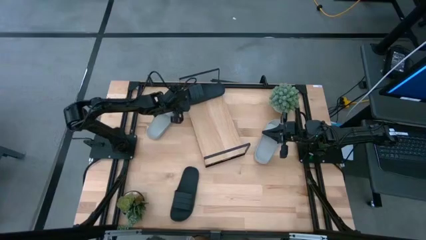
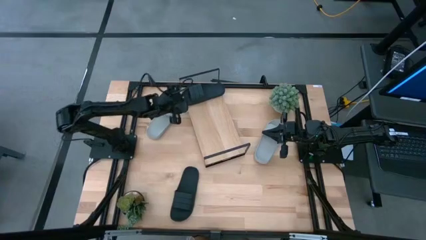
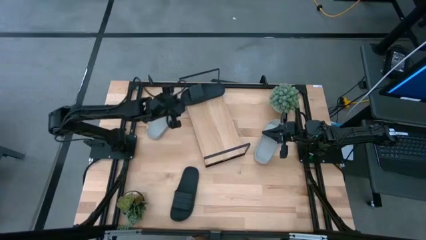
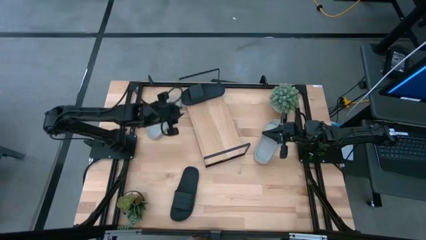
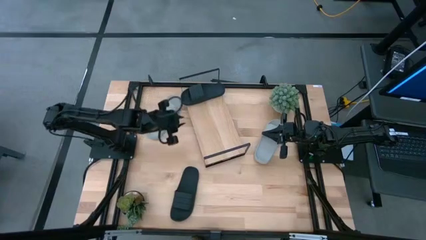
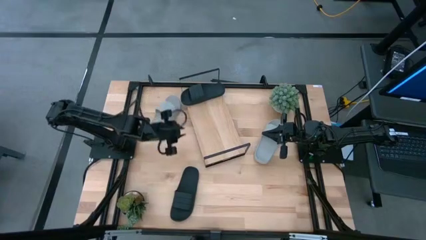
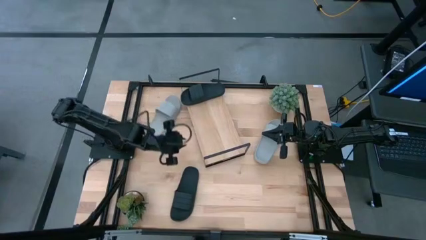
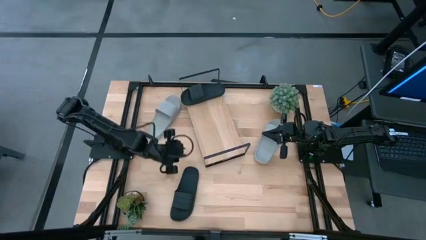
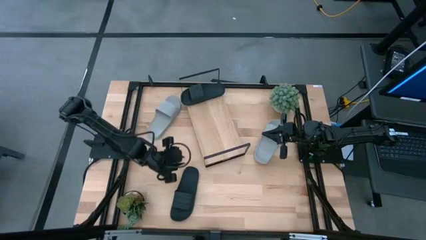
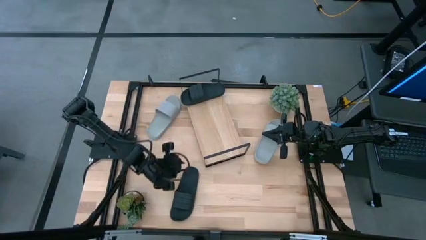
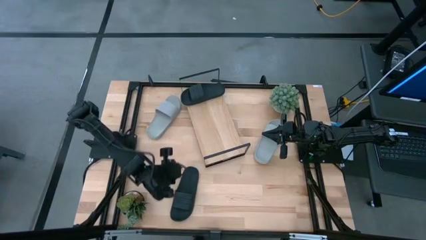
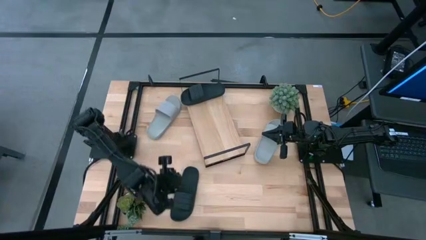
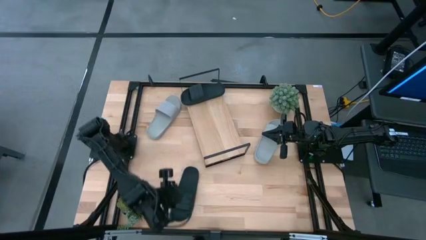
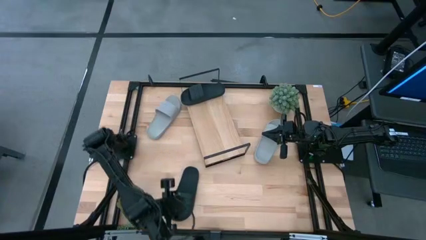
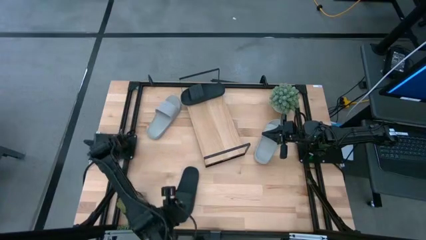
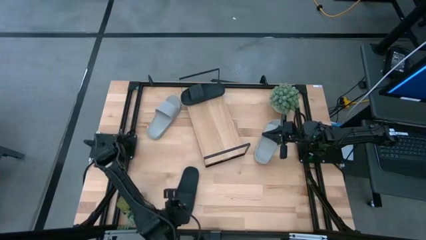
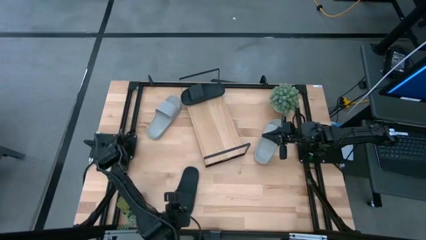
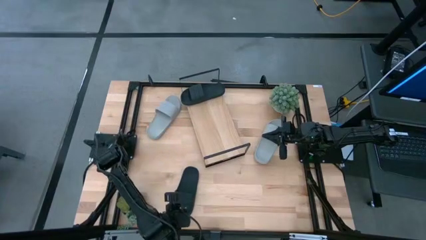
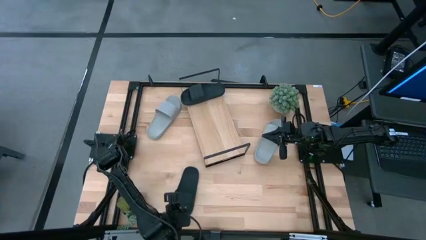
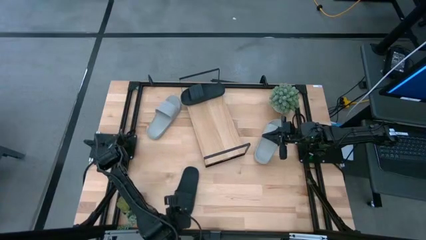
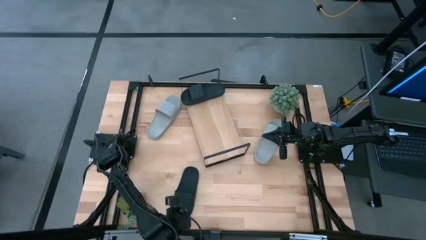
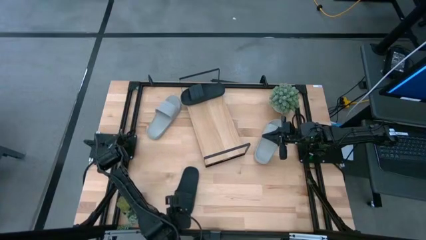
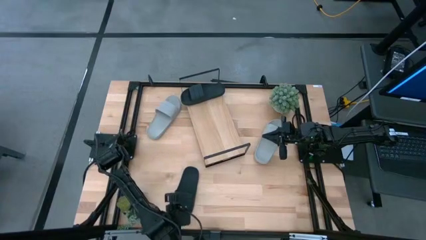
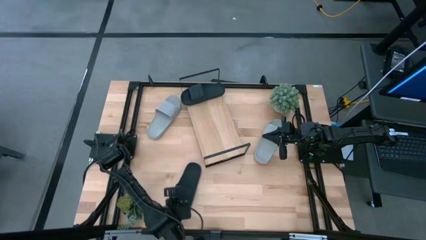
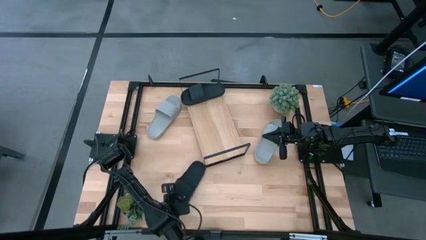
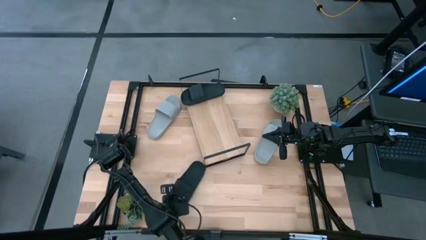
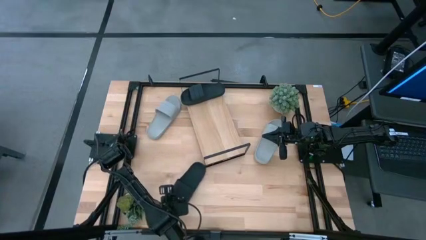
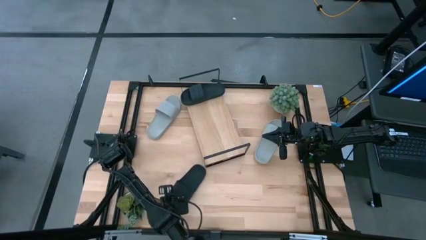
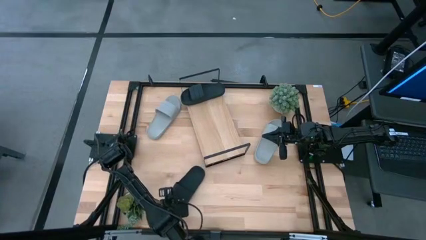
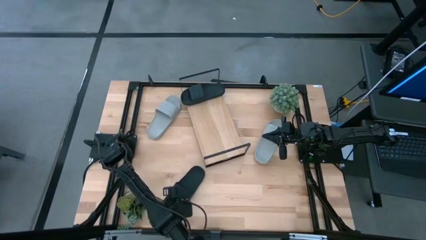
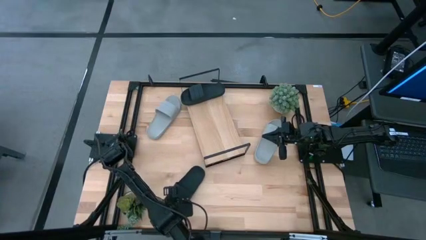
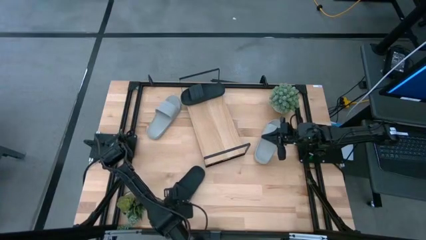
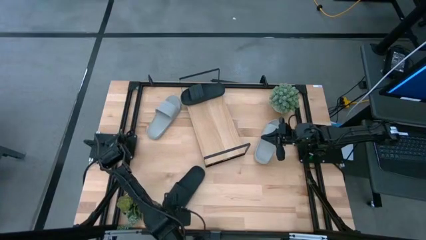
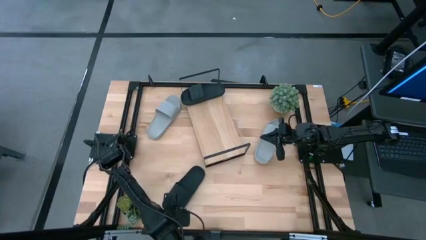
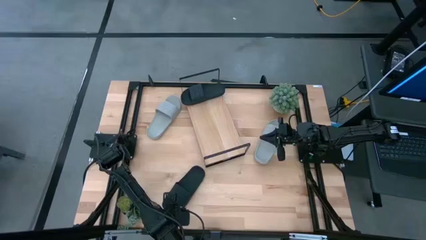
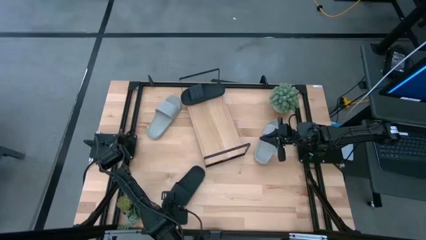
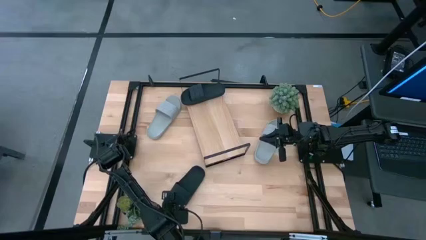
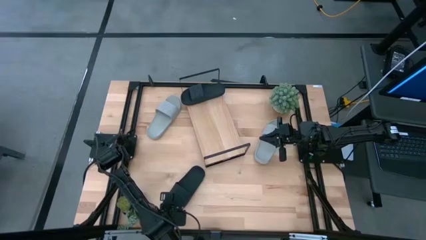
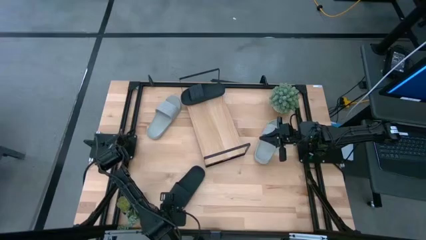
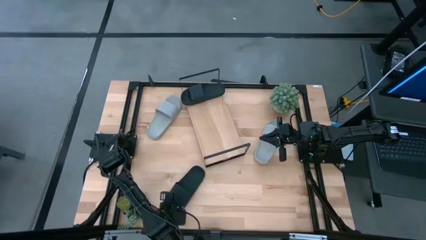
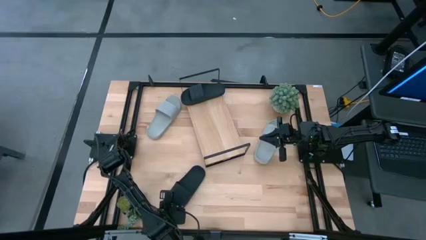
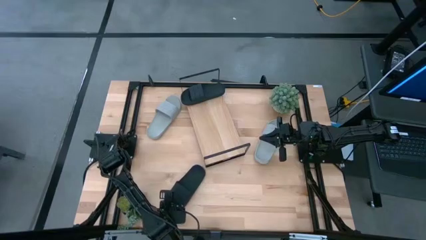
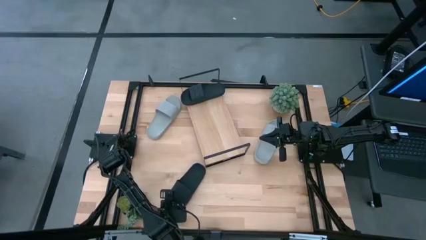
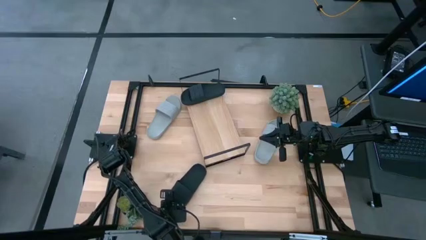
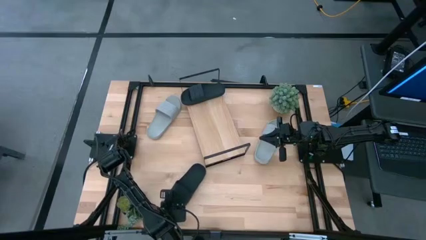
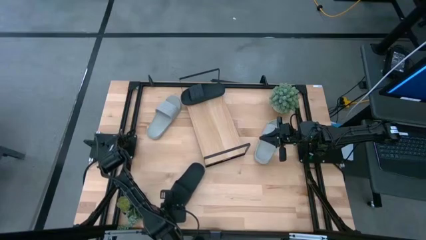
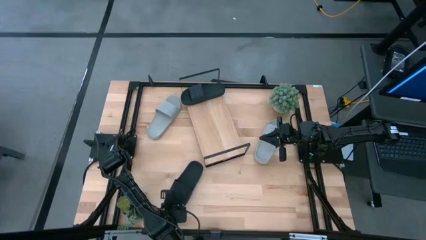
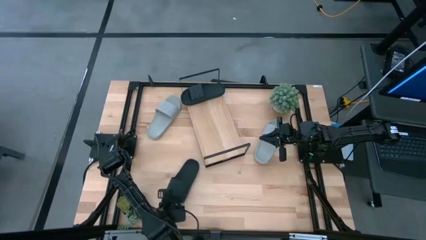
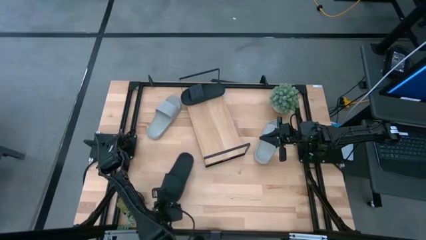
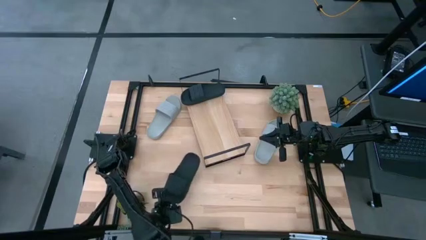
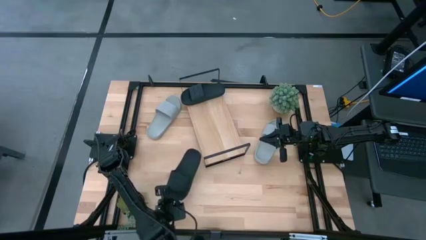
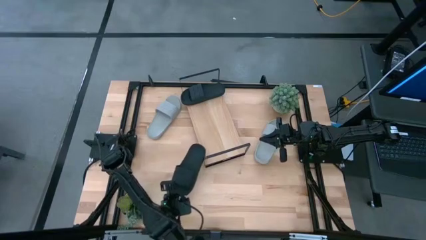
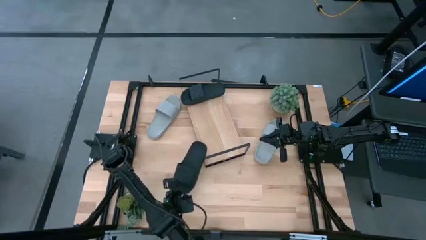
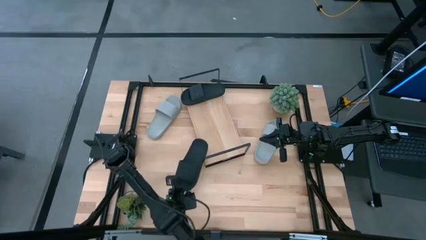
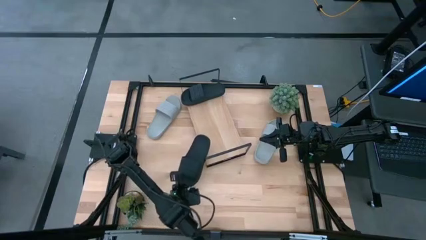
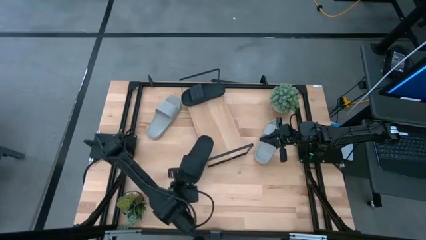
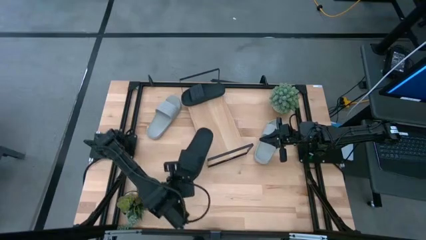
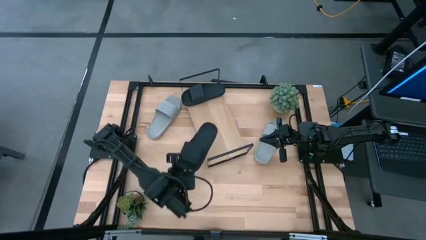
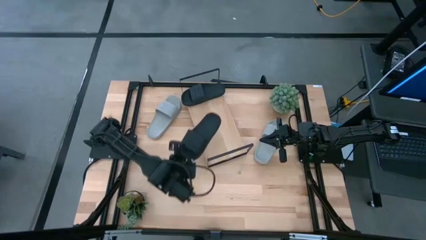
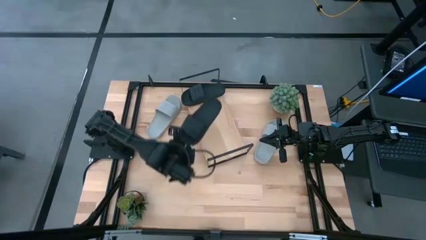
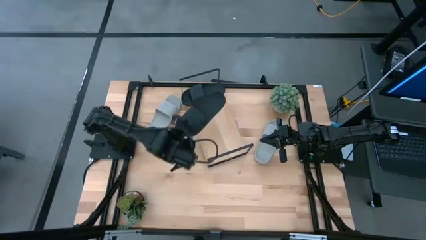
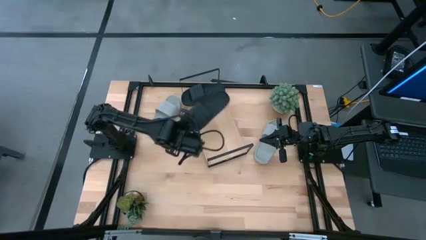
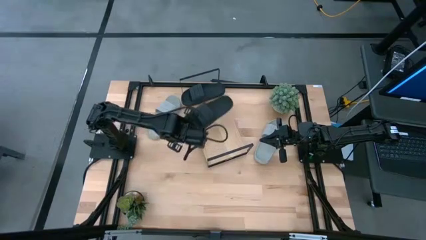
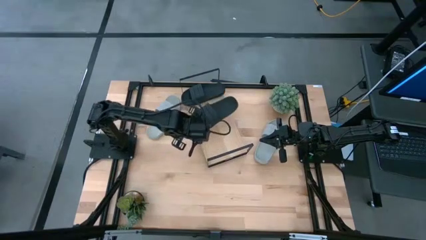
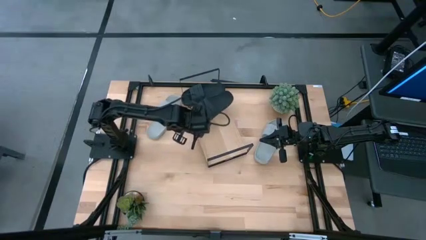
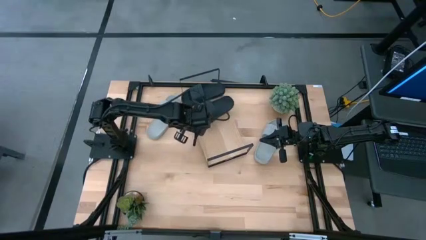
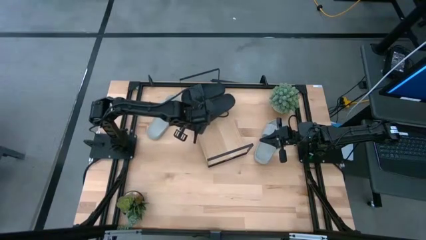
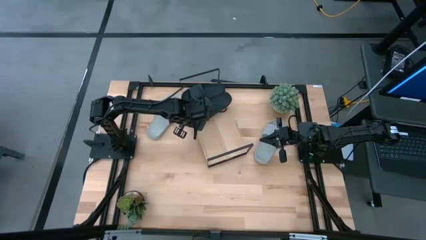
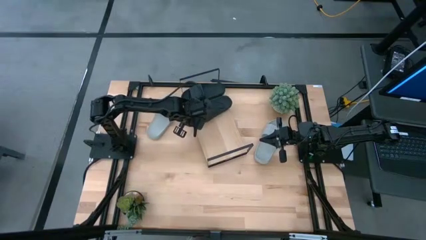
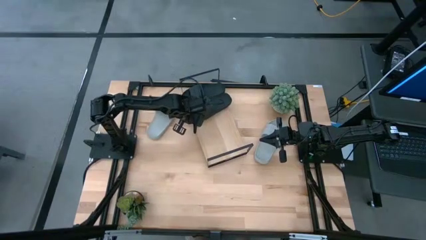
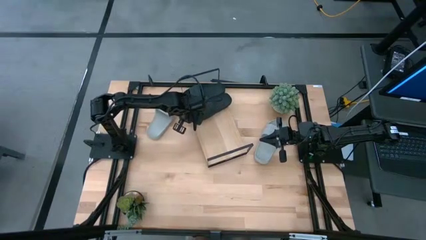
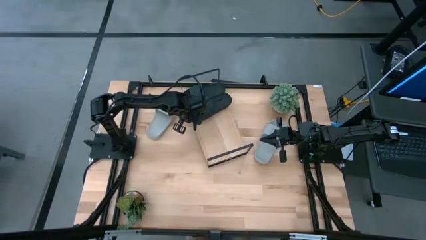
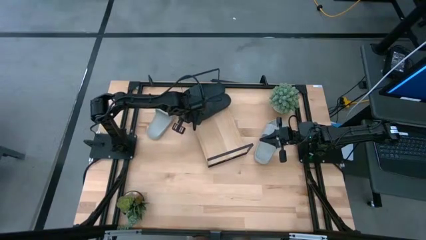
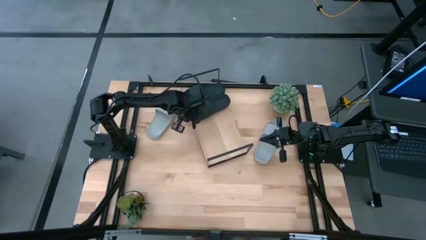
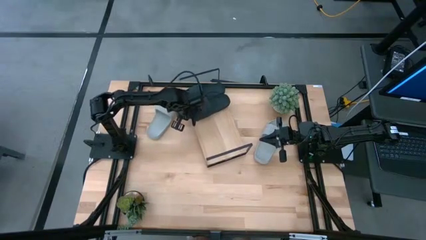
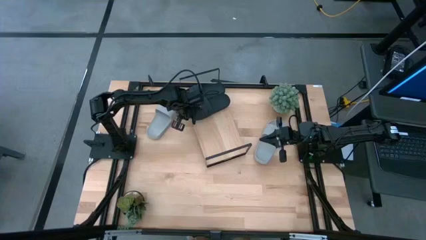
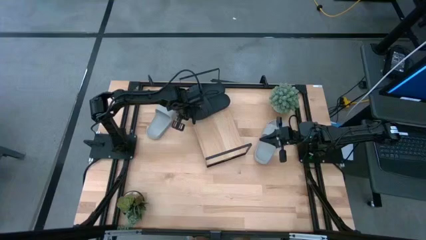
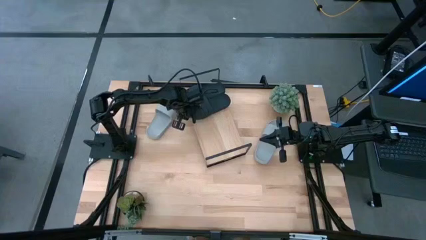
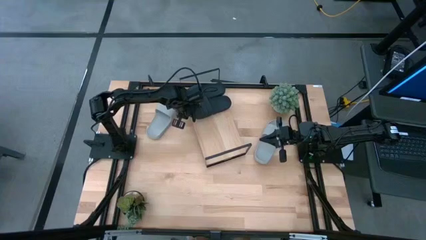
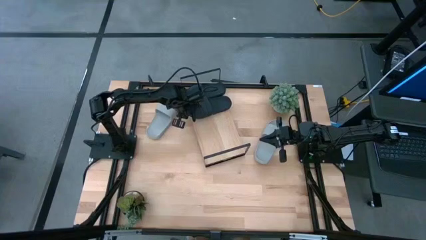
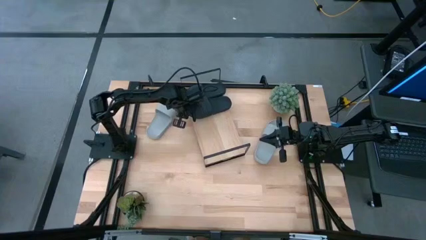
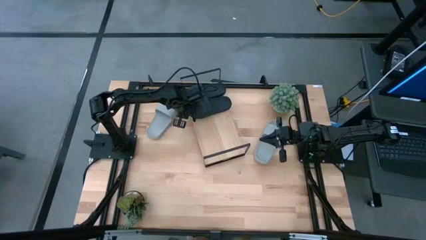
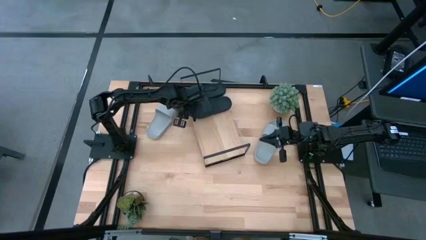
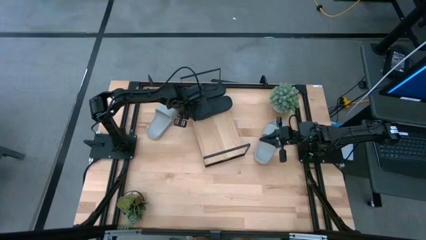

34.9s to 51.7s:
Task: Pick and place slides into the shelf
Put the black slide on the shelf
